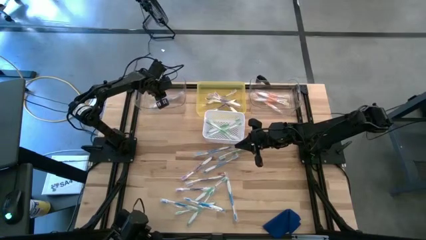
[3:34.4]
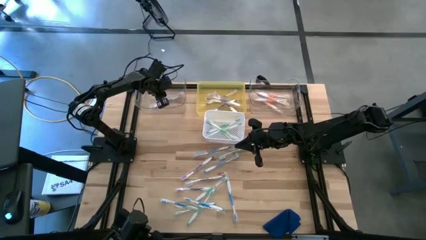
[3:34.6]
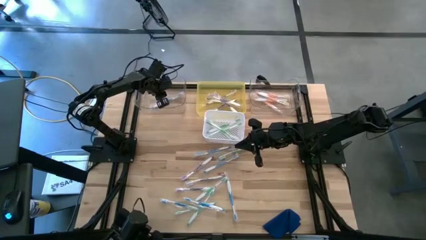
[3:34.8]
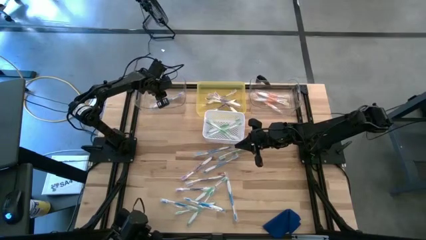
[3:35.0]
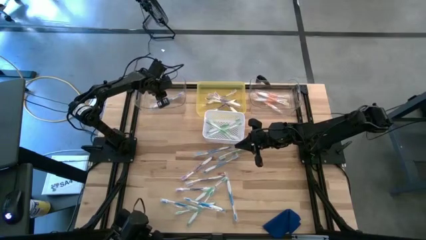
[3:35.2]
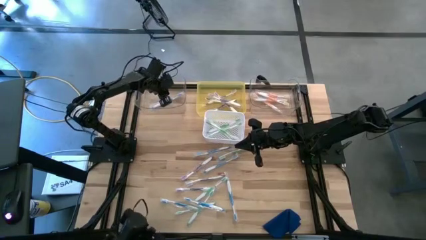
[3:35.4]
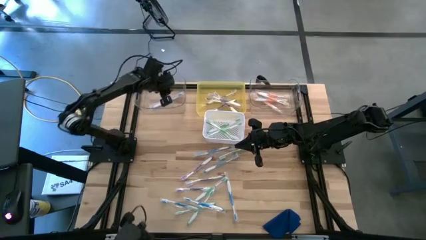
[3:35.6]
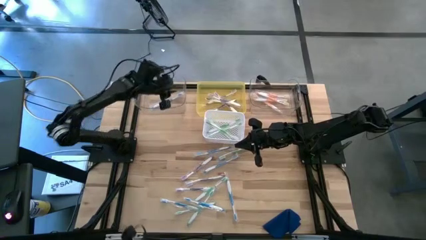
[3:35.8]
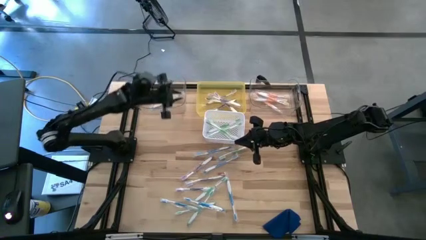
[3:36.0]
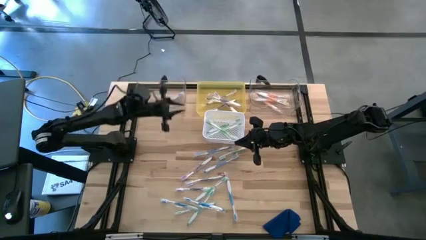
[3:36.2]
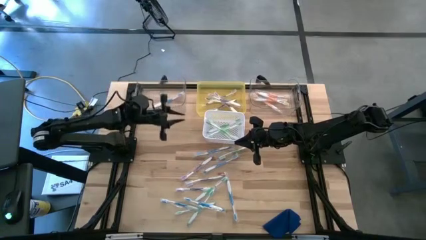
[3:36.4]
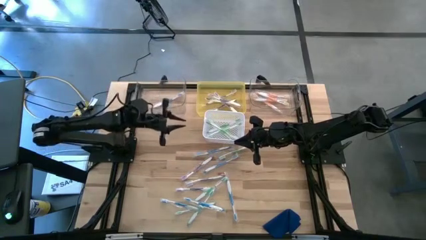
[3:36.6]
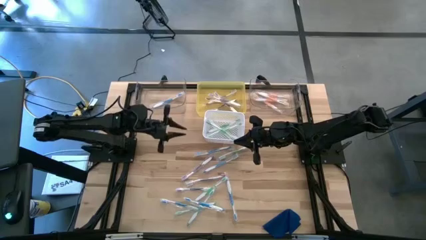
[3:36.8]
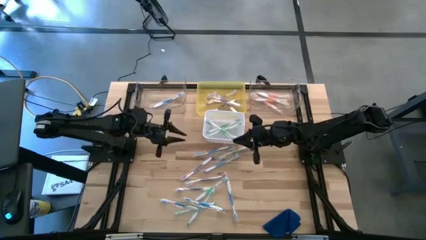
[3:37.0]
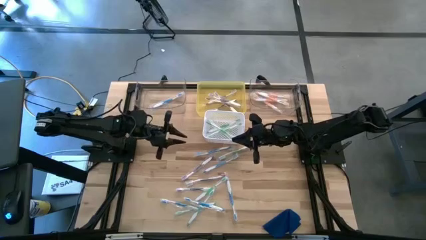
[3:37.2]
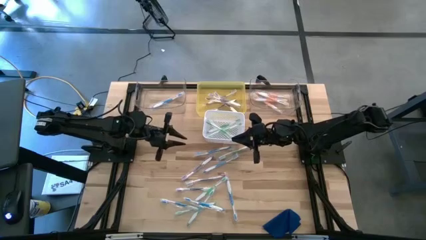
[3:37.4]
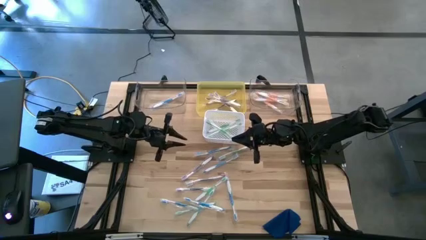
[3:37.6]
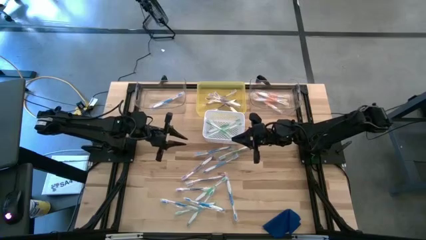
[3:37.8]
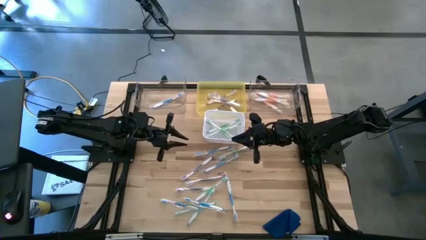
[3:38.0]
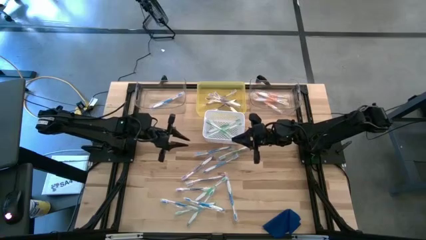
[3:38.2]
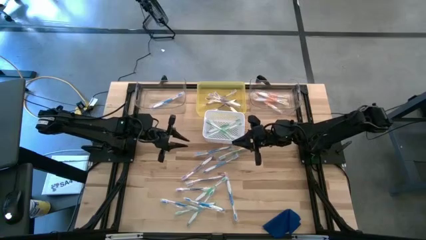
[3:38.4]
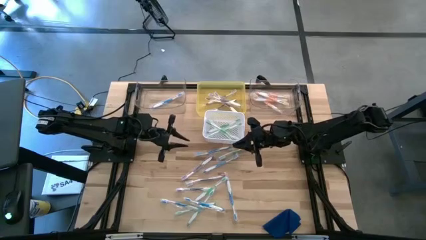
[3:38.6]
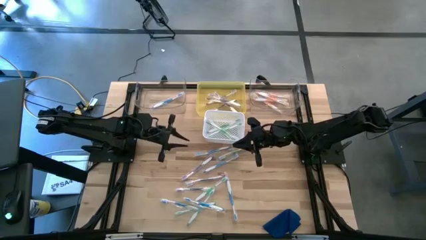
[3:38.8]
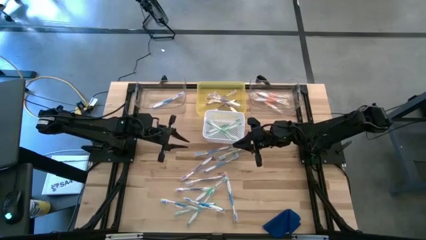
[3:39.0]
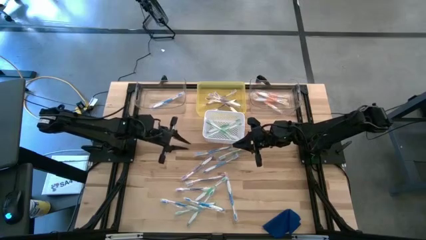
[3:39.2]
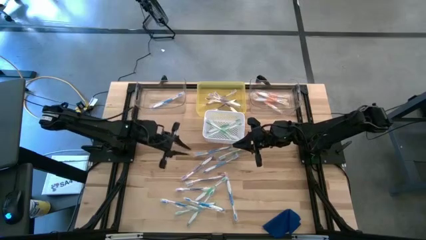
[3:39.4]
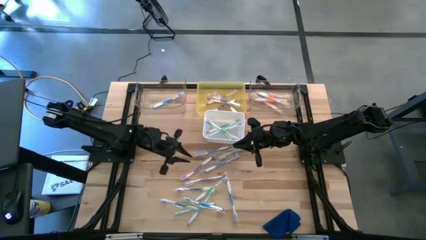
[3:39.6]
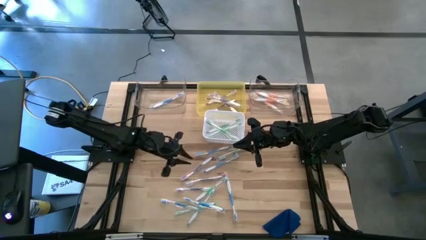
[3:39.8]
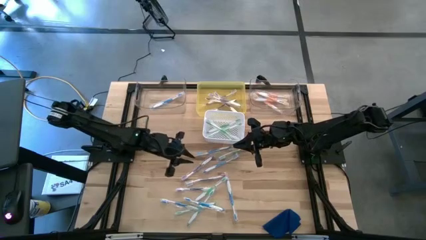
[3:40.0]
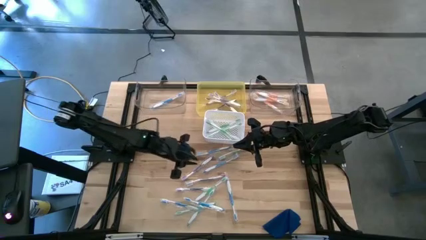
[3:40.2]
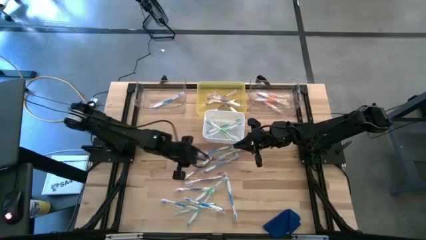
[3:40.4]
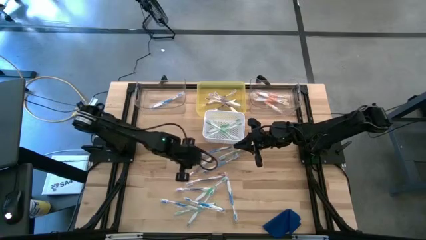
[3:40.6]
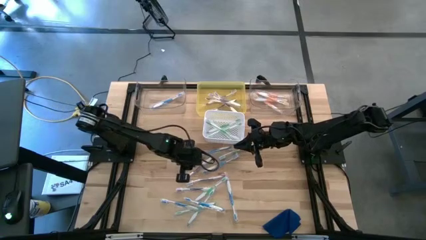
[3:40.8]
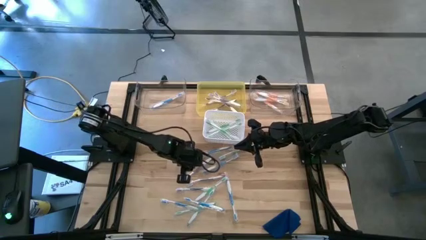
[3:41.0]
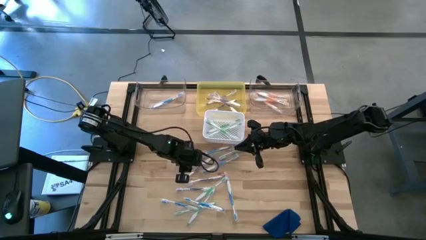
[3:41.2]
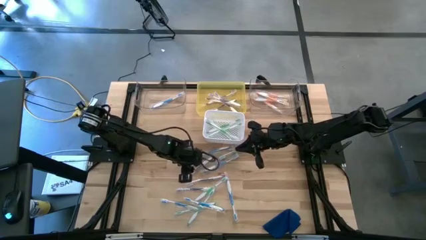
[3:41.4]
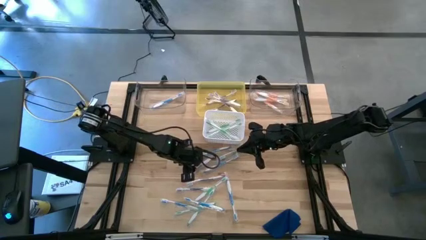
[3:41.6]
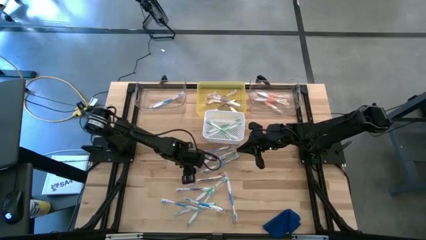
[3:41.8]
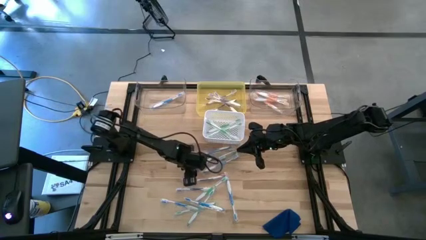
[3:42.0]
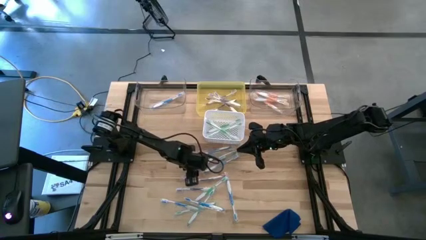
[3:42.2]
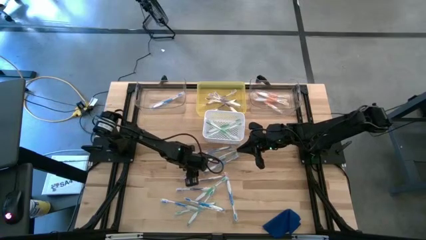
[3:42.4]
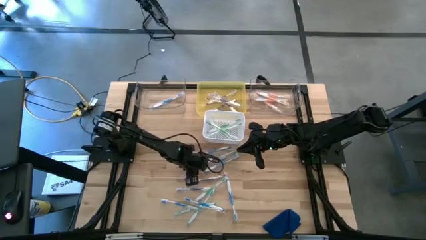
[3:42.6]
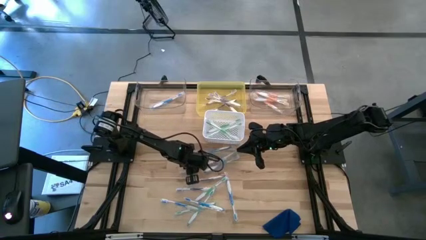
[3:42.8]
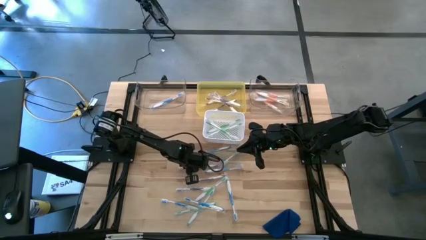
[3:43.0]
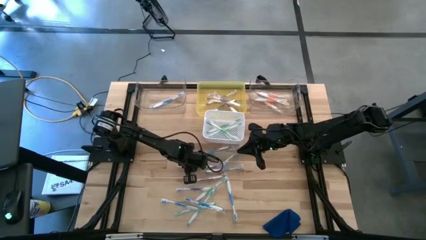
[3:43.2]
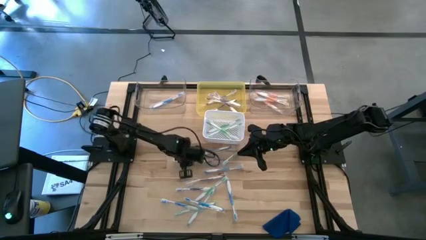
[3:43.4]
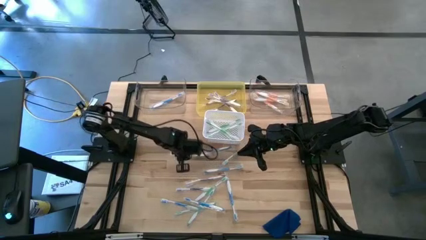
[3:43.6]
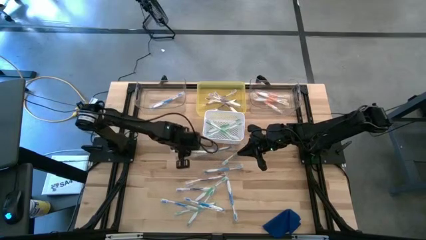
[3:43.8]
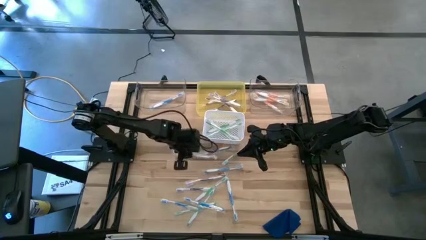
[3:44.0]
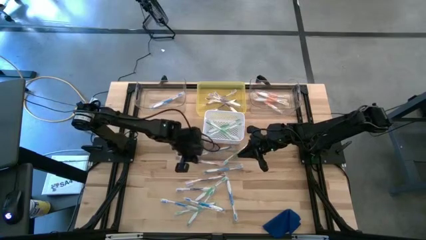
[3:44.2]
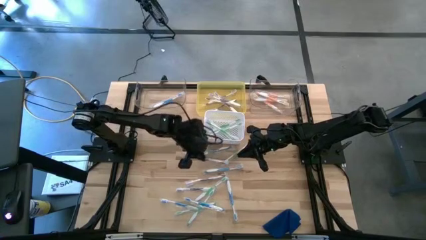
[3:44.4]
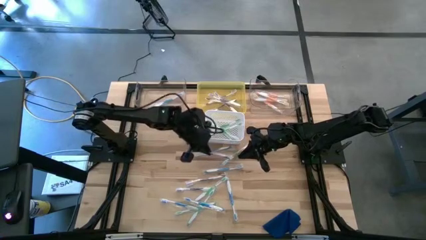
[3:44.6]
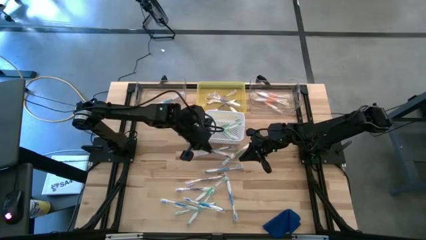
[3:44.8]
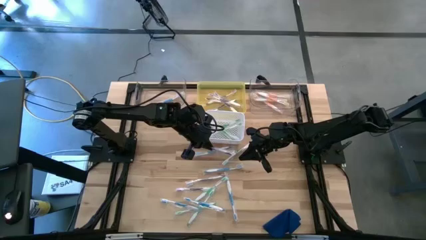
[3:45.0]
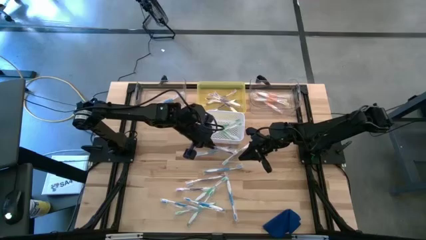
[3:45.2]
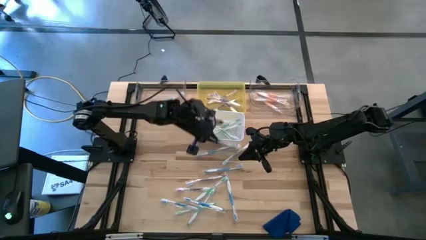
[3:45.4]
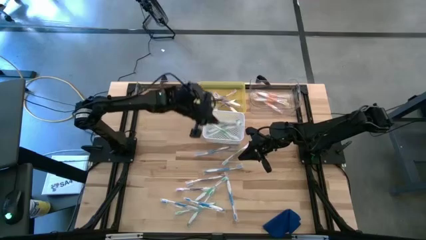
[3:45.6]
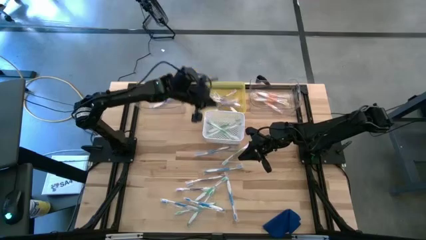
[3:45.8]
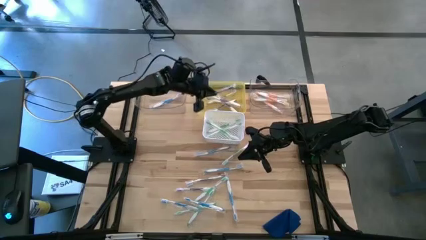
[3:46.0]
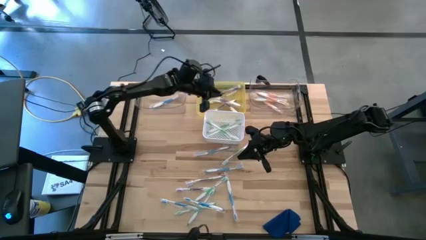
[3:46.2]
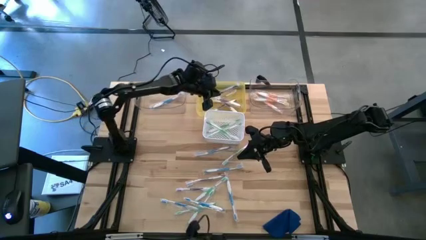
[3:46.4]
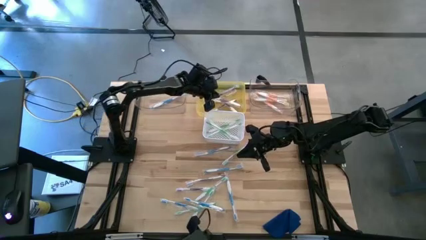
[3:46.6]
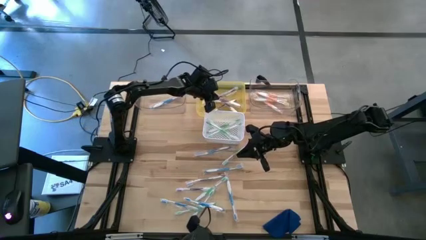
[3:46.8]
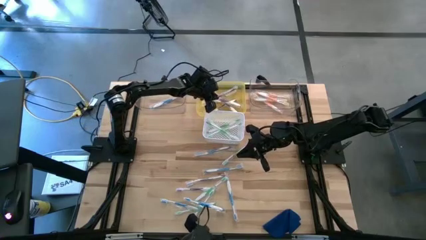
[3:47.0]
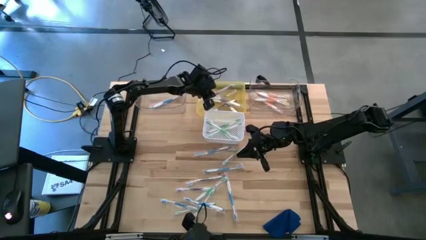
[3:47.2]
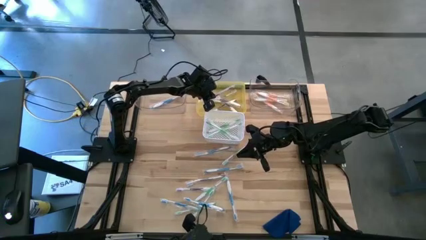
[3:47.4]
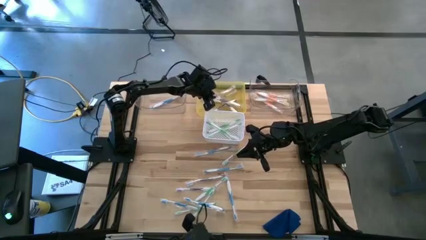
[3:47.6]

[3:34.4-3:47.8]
Task: Pick & Place Toothbrushes
Put the purple toothbrush into the yellow bin

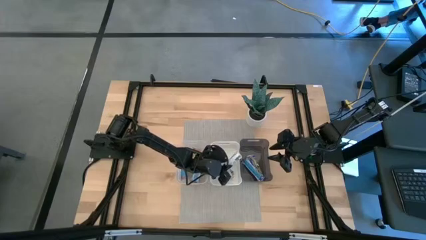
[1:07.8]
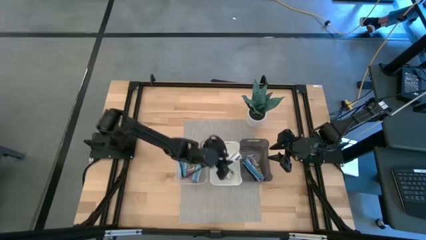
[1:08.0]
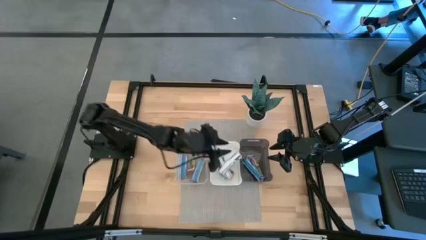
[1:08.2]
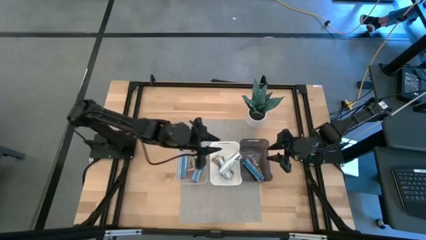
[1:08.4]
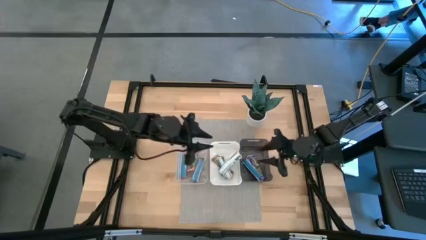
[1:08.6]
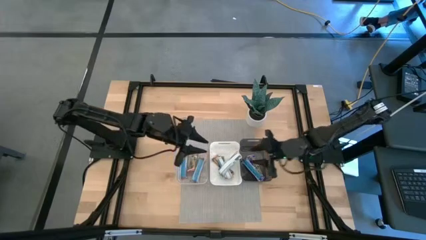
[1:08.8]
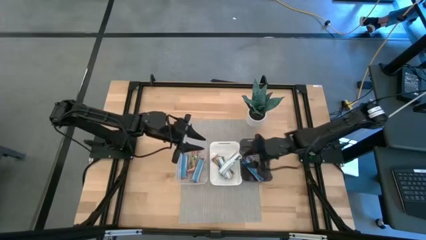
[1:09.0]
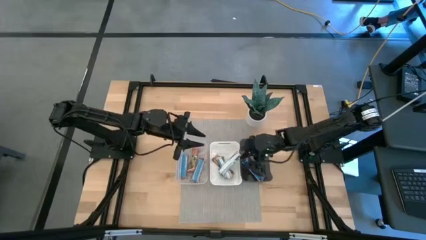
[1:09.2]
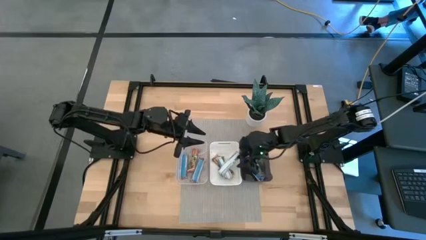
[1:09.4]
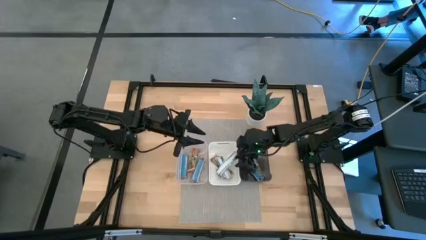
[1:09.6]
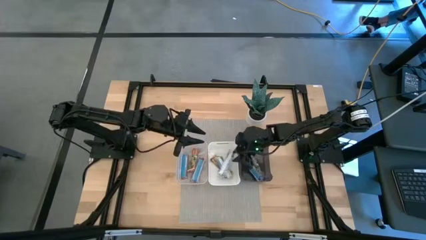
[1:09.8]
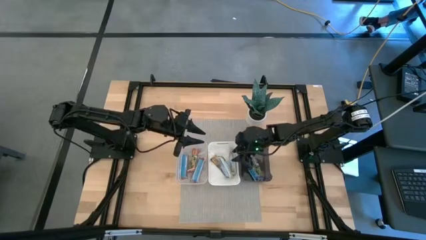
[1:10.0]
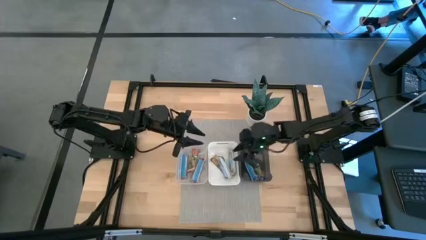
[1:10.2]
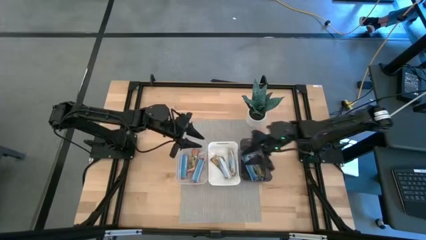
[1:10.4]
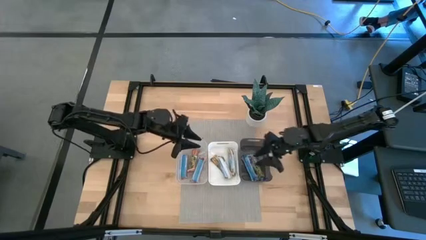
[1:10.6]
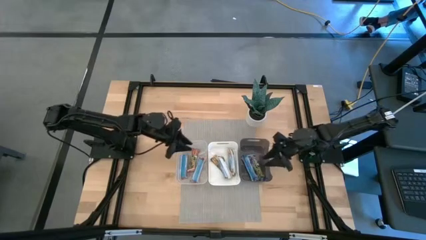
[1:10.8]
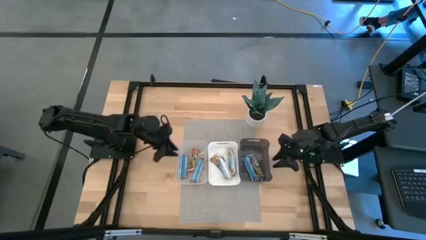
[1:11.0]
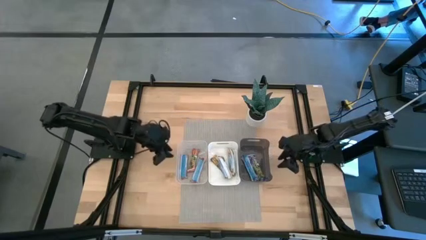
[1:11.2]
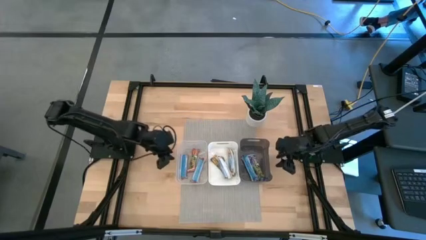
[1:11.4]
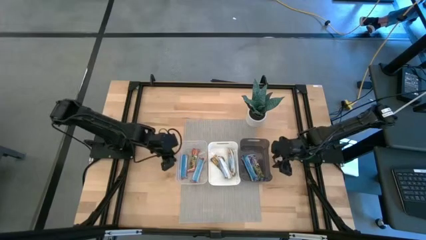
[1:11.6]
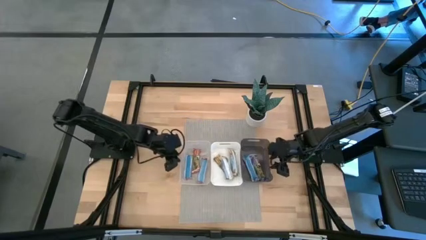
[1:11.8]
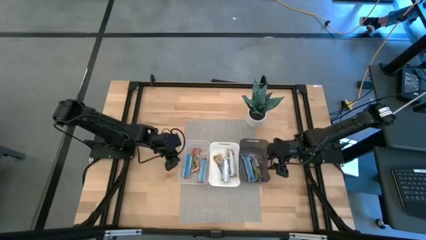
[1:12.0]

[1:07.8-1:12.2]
Task: Pick and place Granola Bars by type
Adjust the bins
